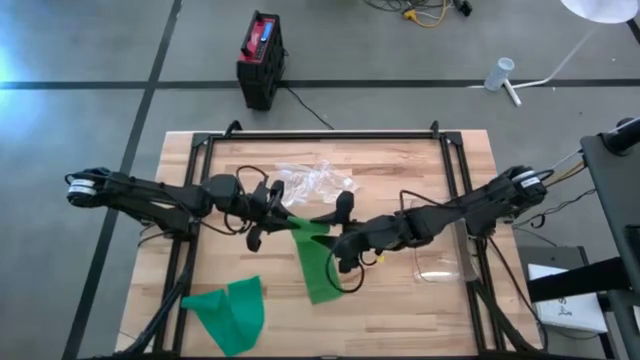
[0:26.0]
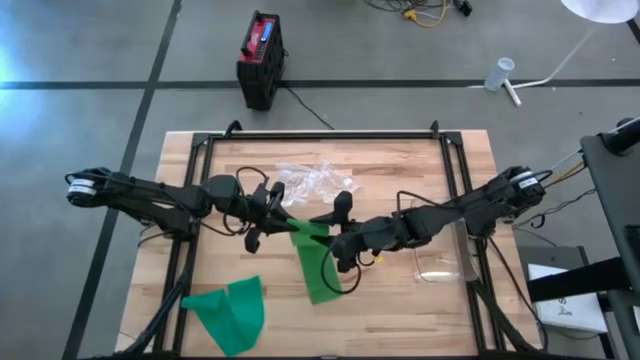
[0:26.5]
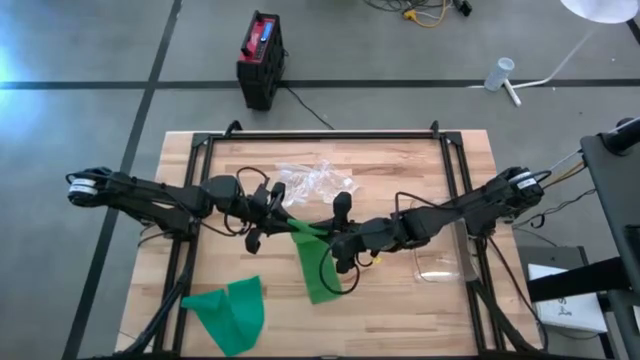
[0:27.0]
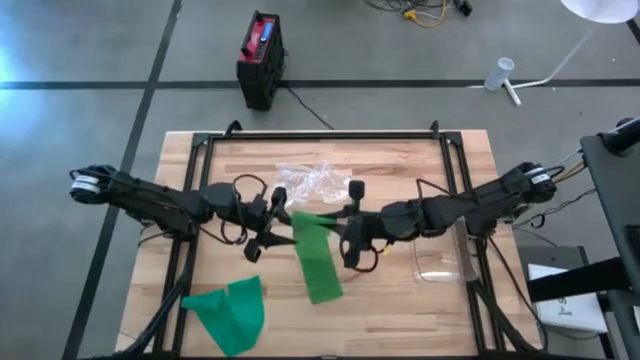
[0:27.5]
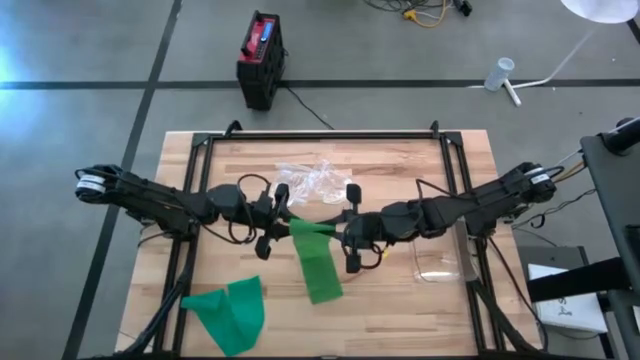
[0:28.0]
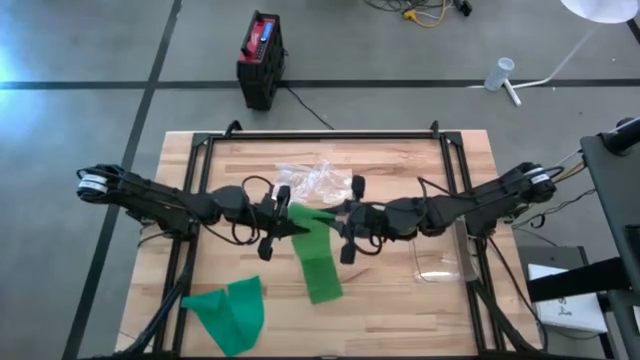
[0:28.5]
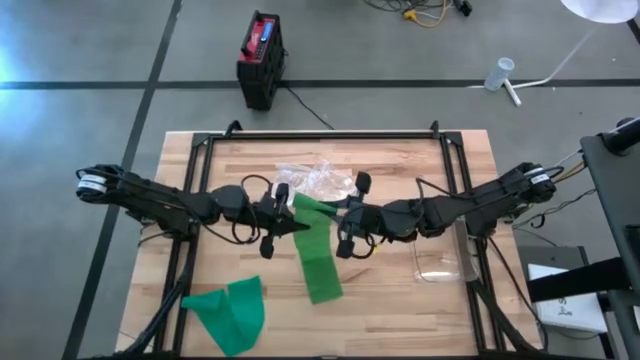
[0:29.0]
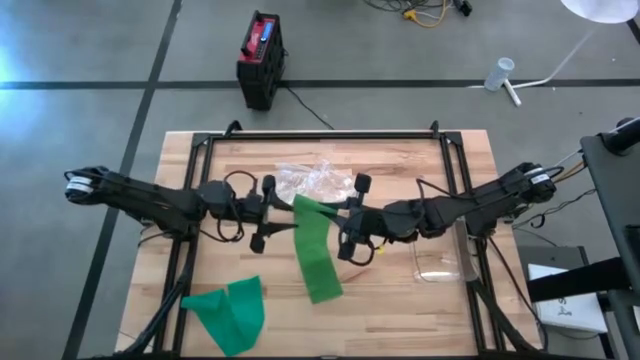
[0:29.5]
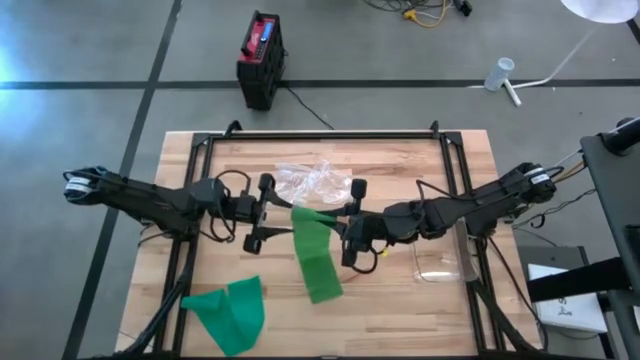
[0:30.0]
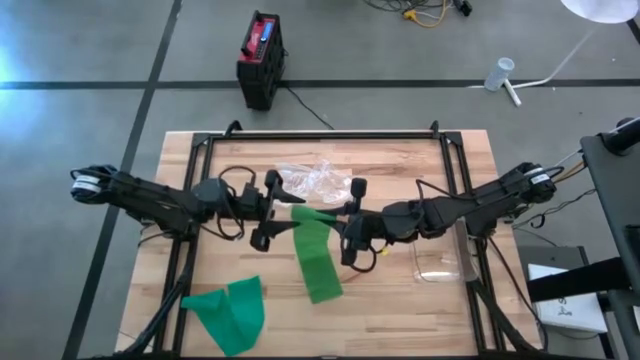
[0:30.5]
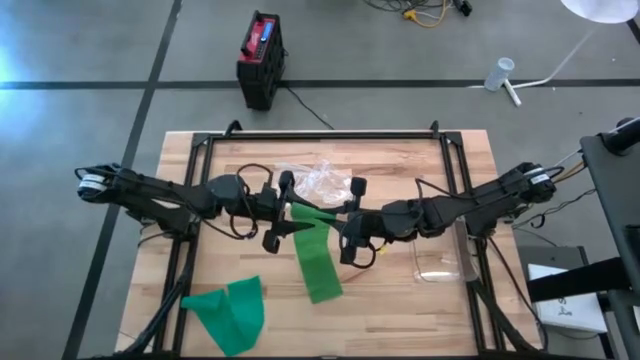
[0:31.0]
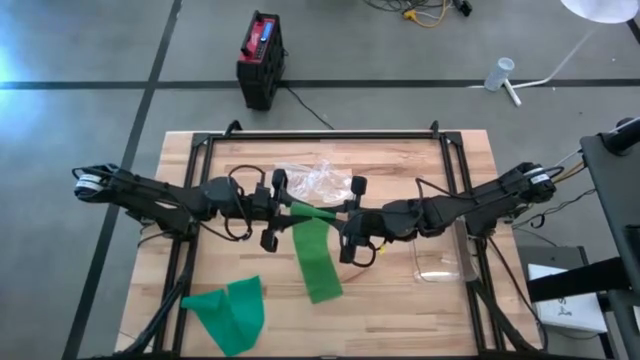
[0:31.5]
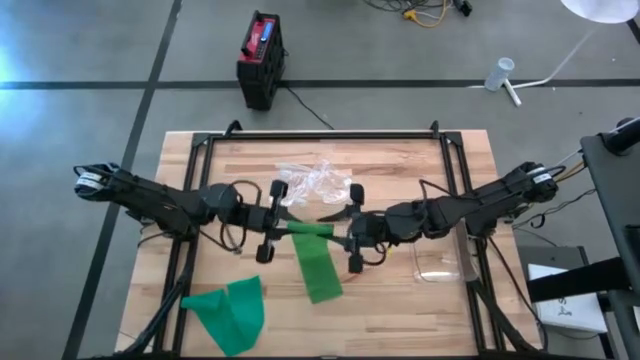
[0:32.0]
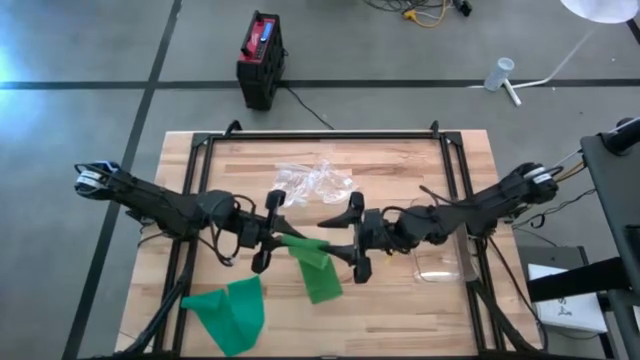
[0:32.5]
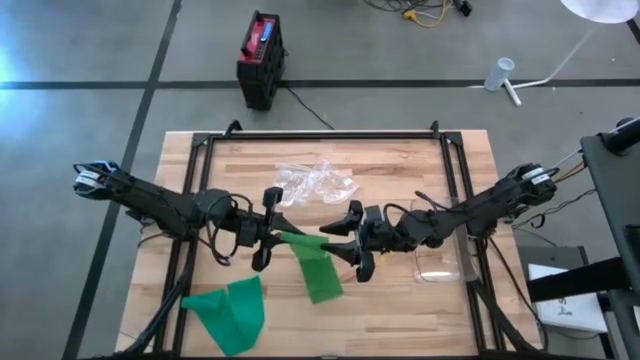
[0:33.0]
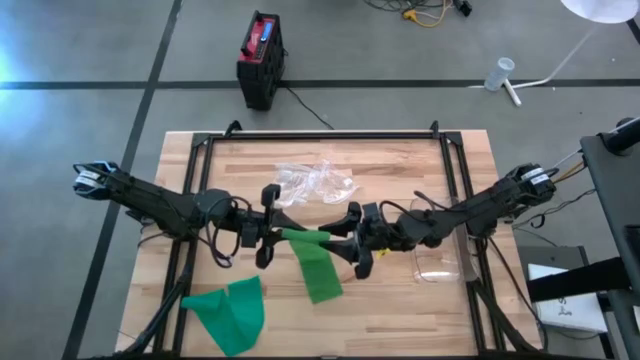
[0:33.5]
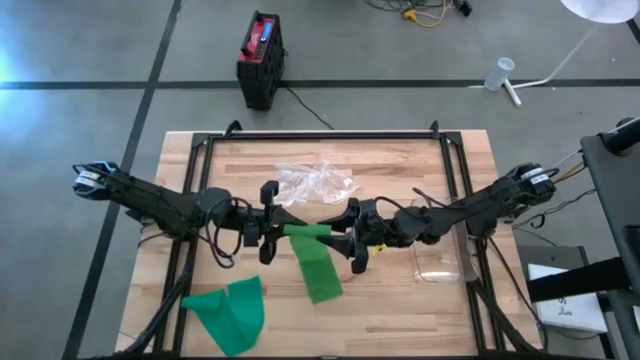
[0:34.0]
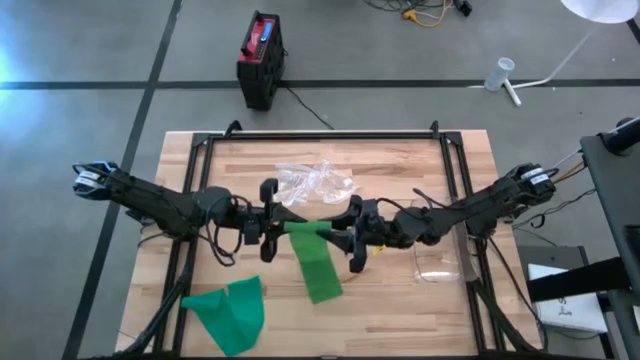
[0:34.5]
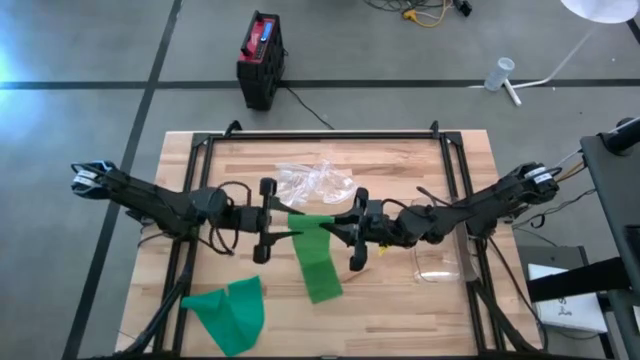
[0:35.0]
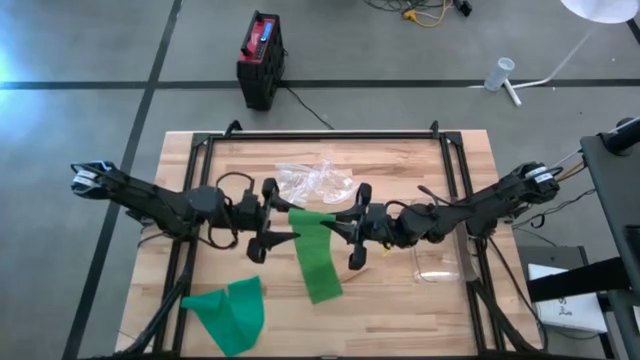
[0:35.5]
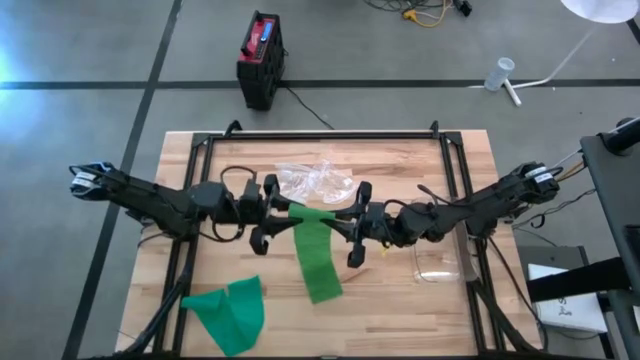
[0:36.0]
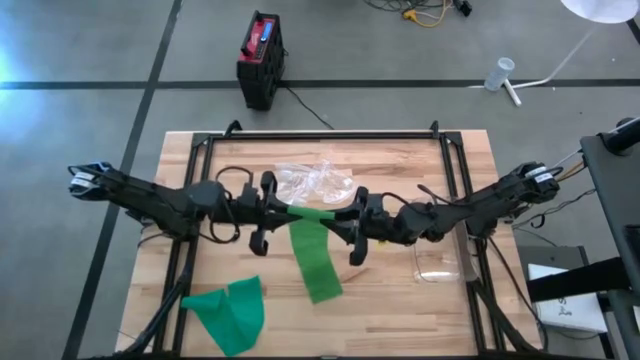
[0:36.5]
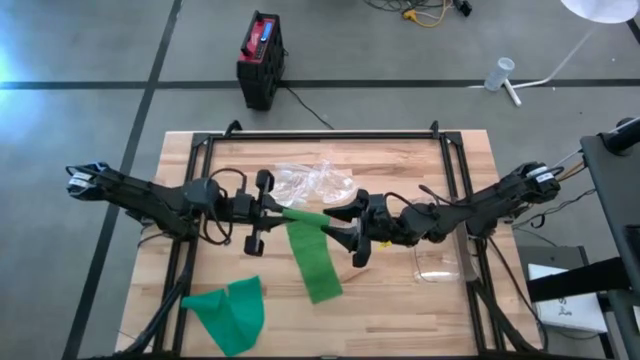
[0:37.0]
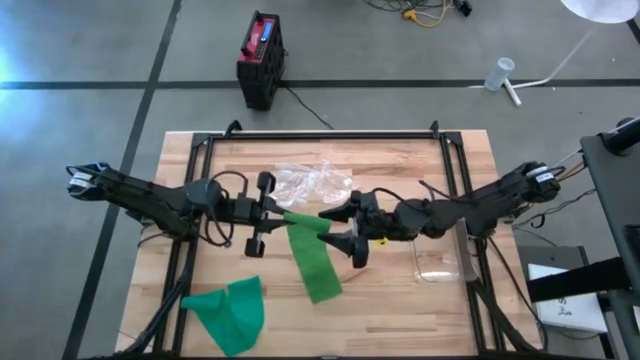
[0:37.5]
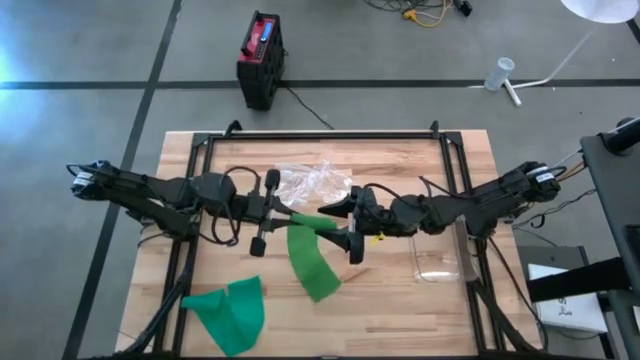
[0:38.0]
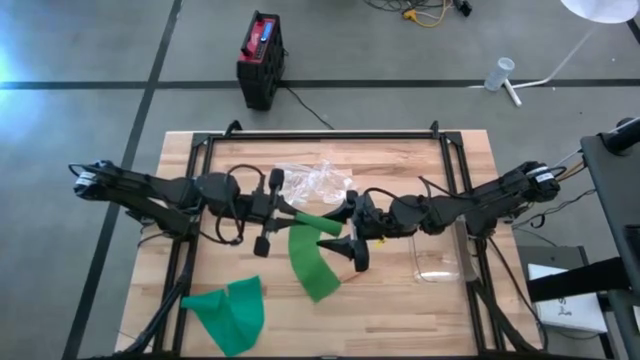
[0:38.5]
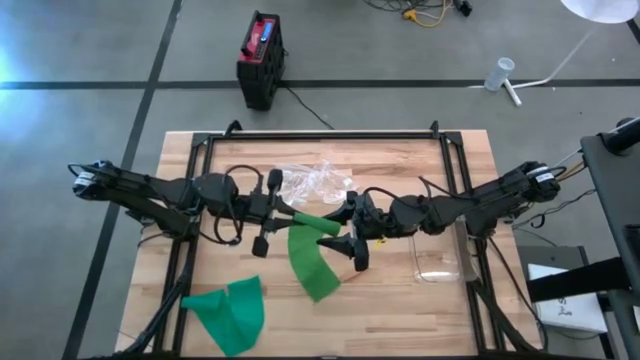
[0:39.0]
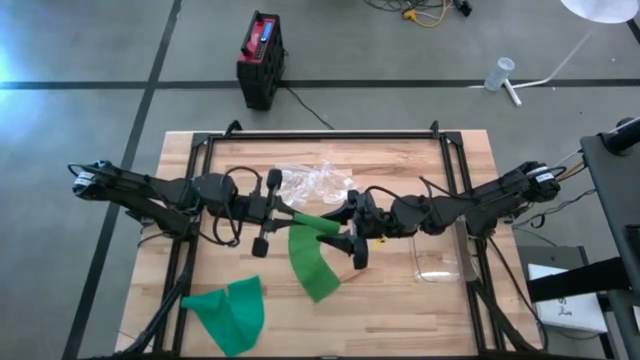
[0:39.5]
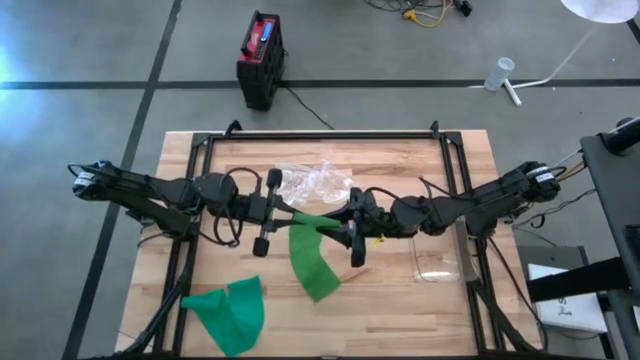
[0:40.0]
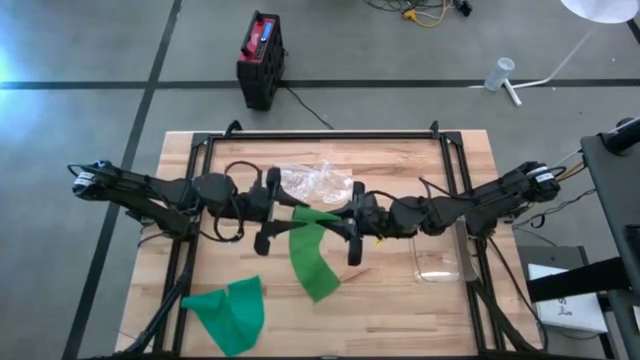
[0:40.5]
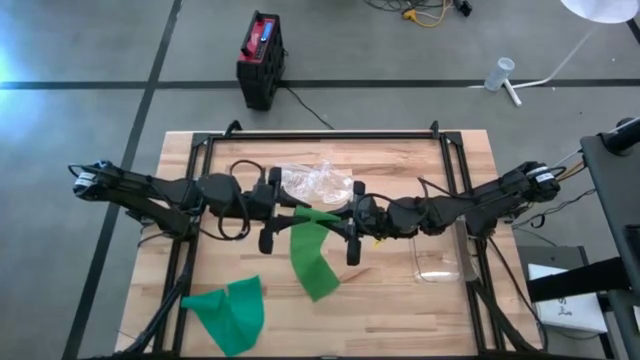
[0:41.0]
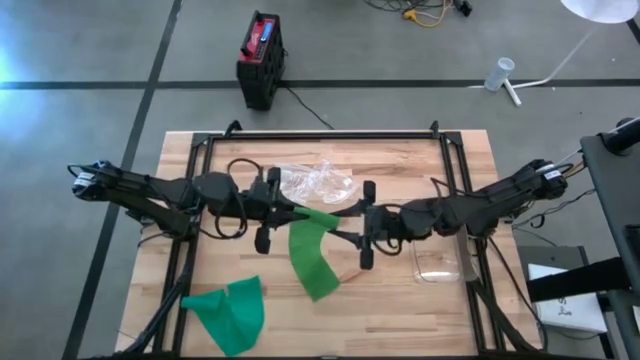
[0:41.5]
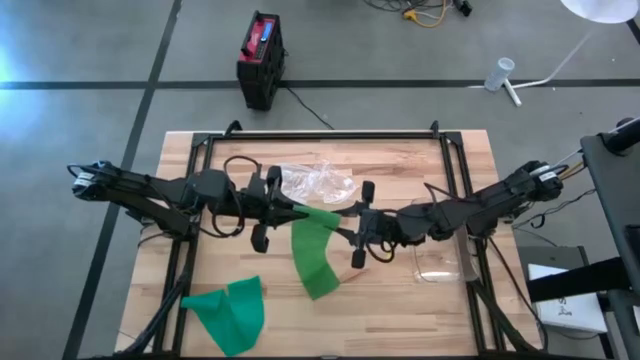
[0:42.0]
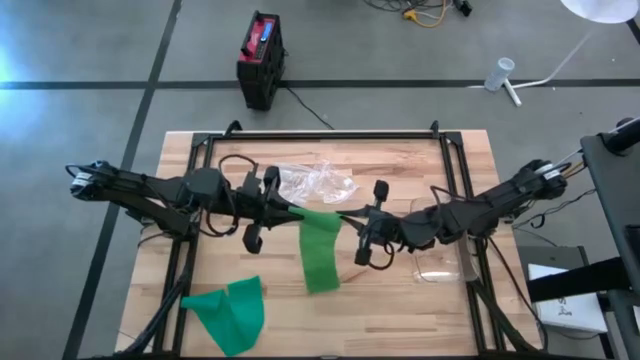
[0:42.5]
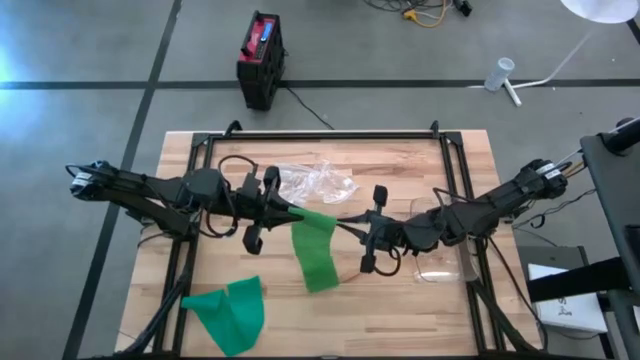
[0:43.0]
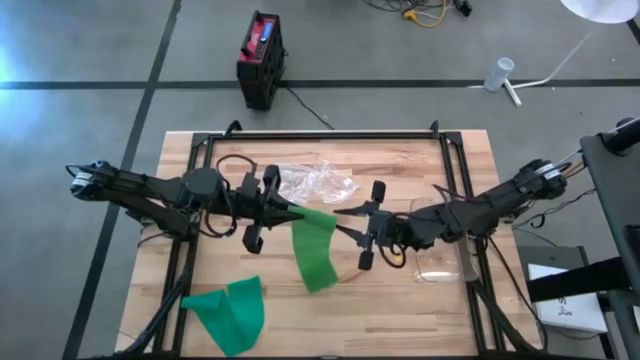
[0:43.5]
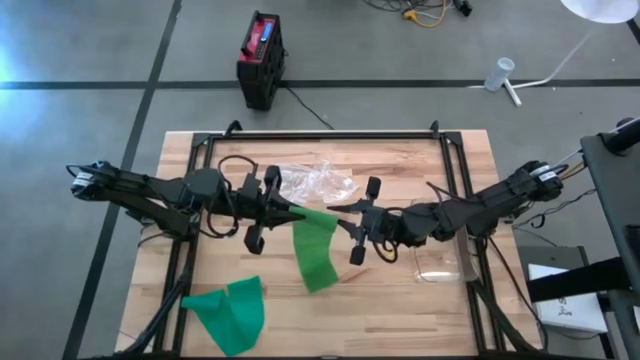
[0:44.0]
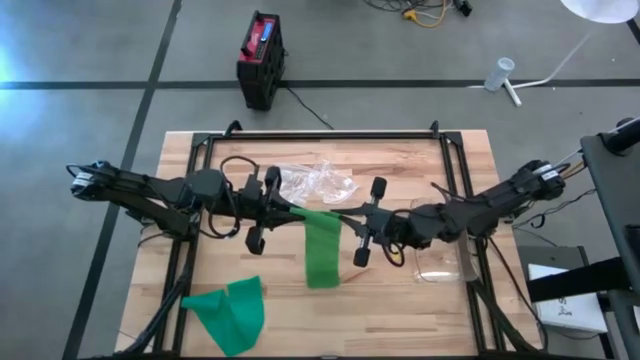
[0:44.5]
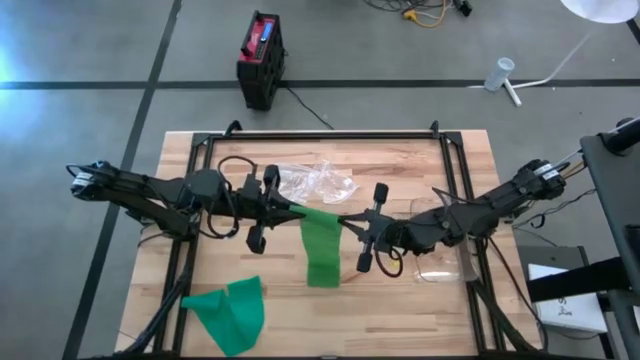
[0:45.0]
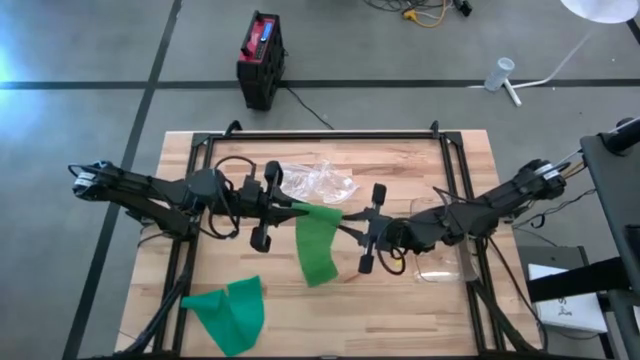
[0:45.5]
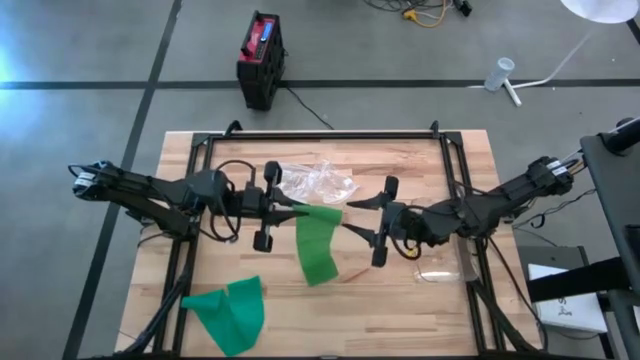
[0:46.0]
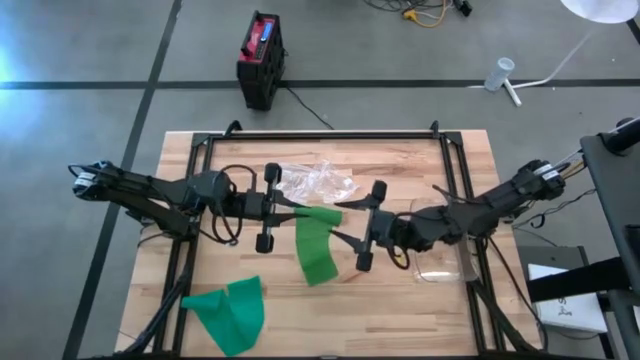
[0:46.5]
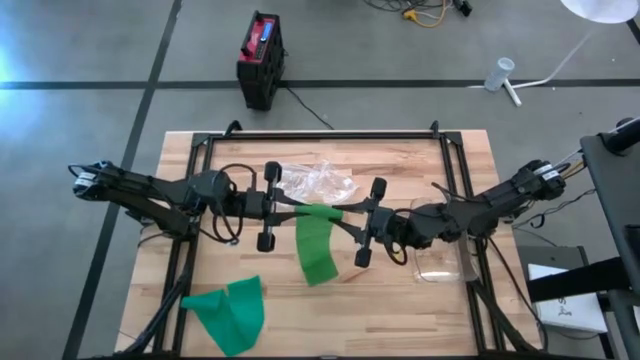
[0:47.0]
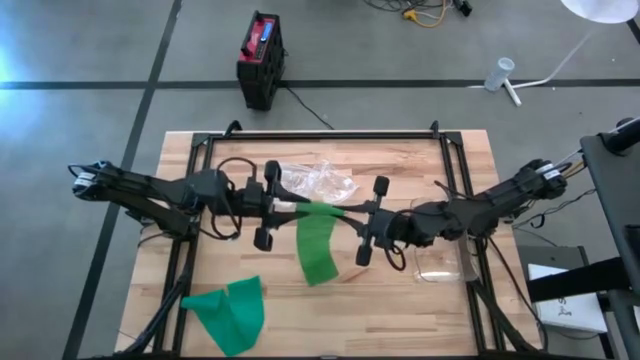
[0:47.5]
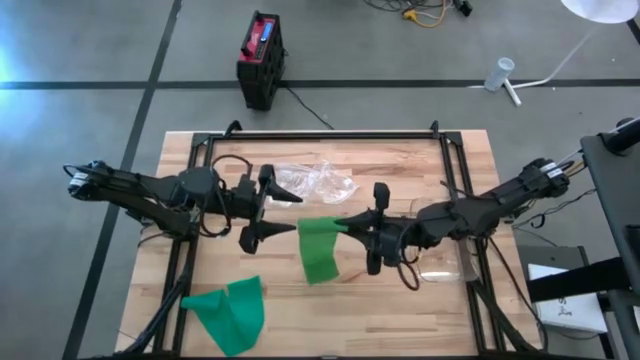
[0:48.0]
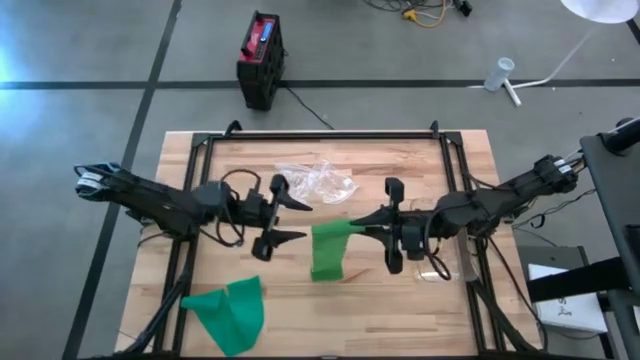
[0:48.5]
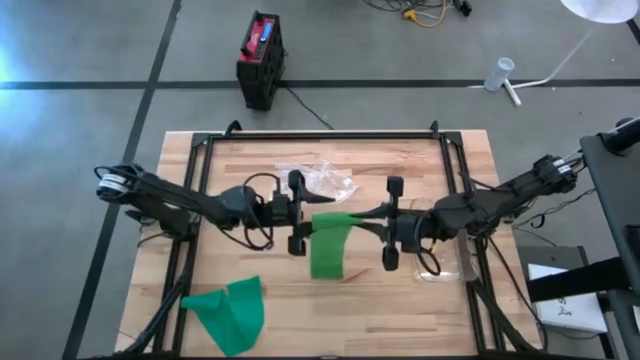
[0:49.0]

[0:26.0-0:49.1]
Task: Roll bandage
Roll the green bandage
